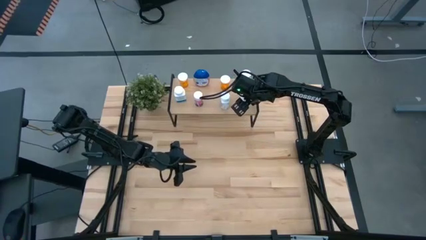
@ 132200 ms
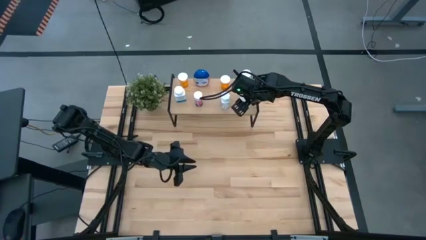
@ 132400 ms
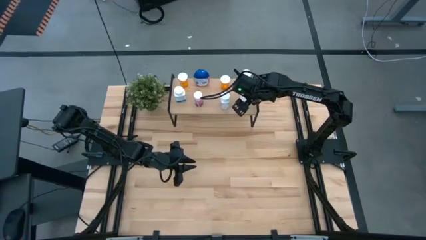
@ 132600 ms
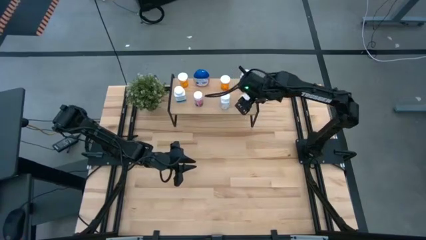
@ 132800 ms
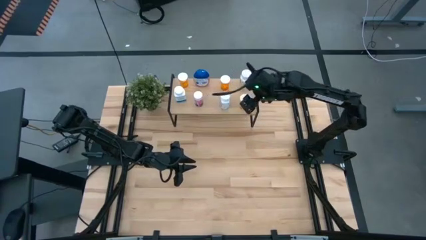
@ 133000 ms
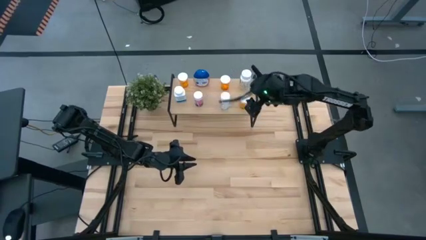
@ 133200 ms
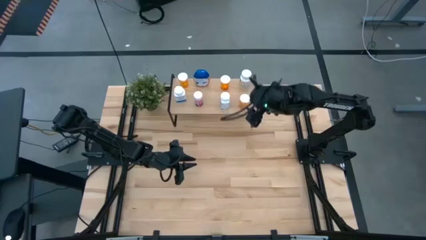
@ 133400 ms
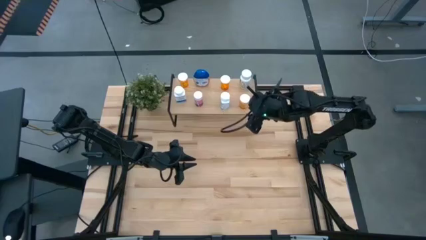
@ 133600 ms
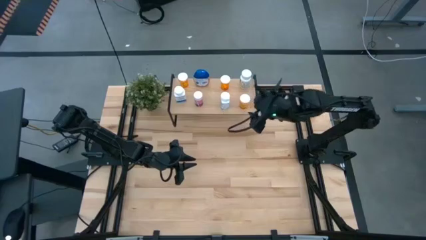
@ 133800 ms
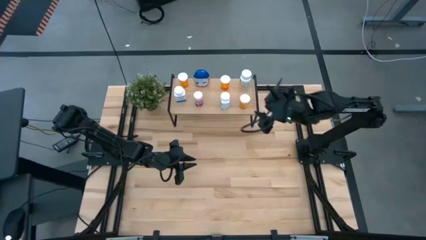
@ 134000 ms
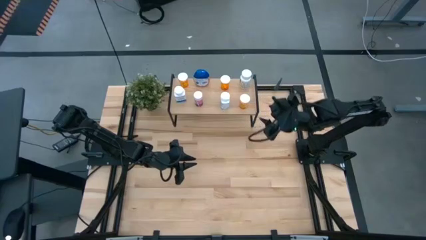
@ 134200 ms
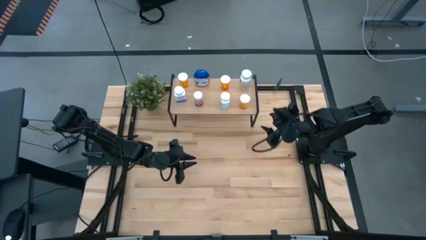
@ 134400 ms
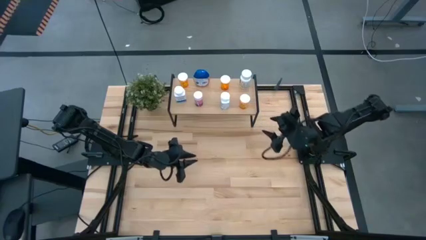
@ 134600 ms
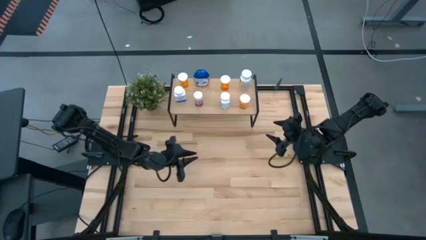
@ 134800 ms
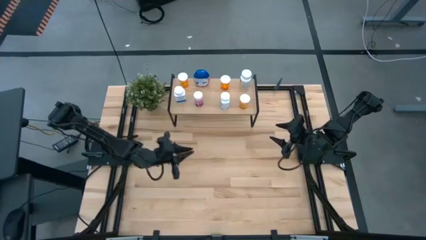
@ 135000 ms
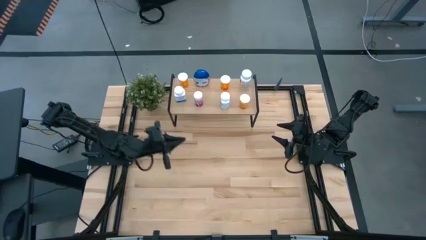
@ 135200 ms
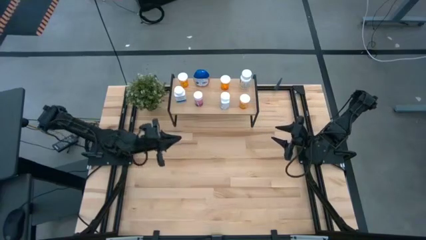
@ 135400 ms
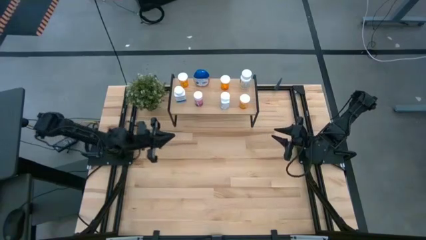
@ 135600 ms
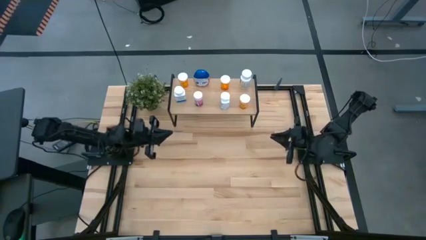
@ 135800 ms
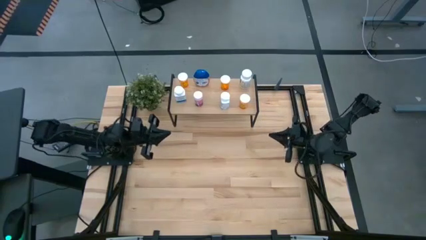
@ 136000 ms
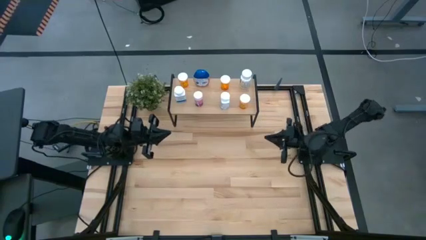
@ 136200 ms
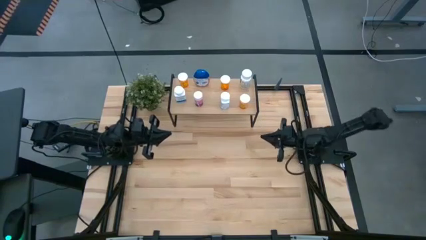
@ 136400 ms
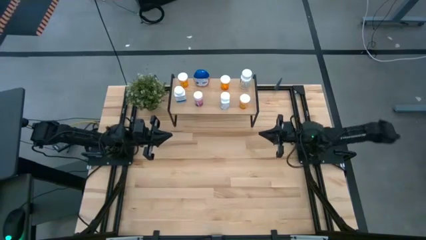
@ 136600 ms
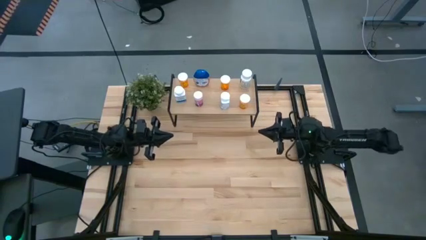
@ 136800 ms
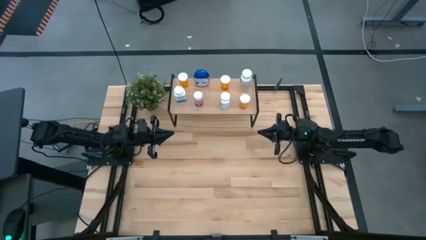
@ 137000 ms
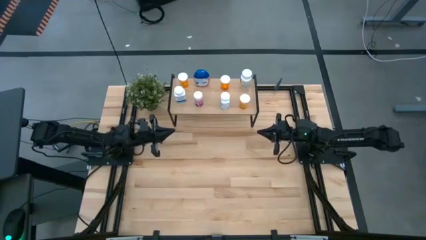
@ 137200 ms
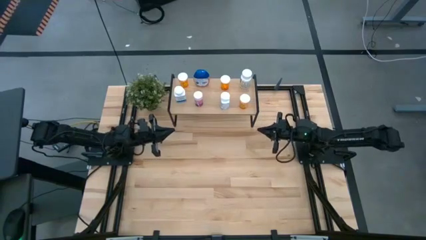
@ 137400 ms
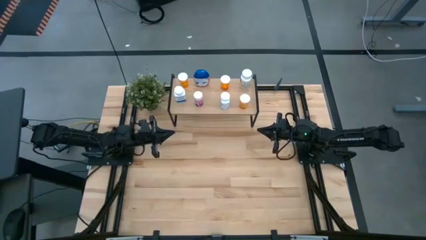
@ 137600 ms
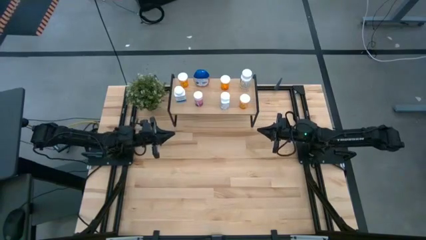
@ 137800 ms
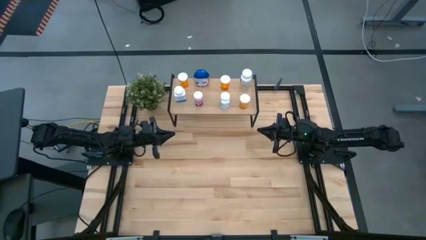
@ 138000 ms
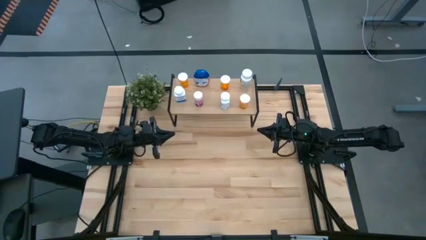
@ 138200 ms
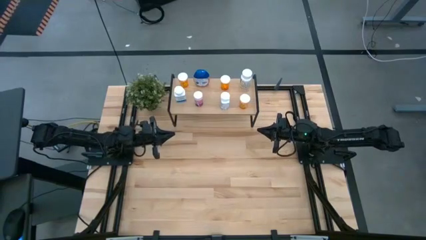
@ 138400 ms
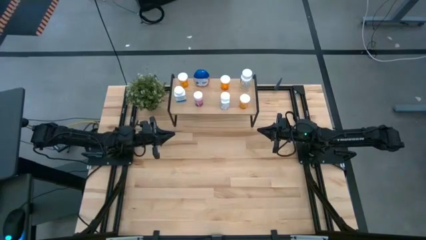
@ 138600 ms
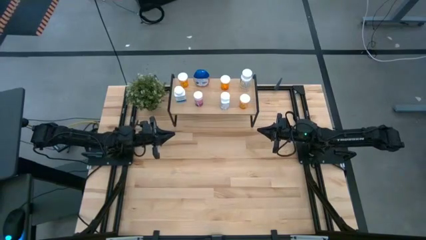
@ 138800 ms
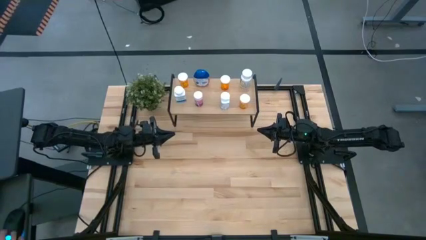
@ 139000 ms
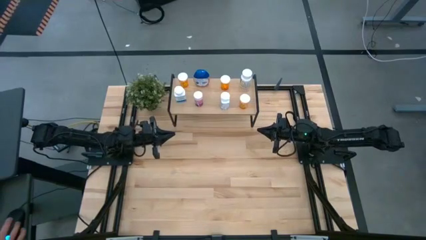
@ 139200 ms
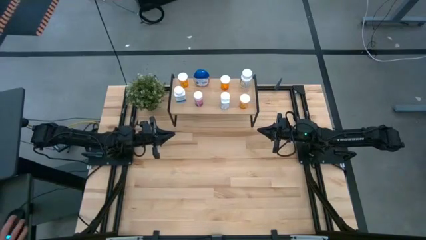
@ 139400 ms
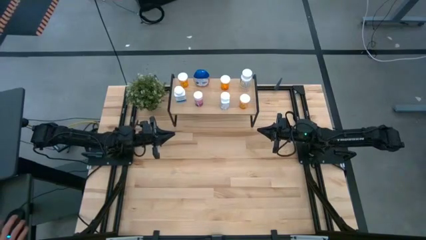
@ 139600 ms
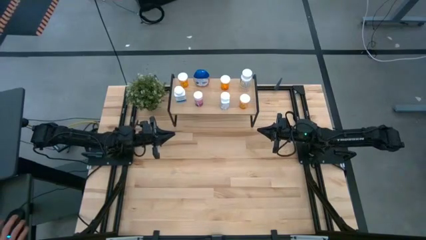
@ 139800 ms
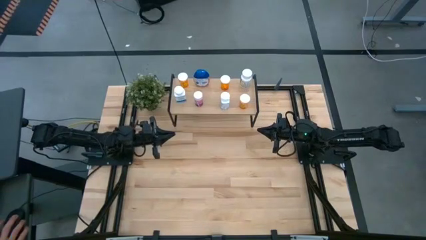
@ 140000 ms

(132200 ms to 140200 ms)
Task: Pick and place medicine bottles onto shelf by color
Return to Home Position

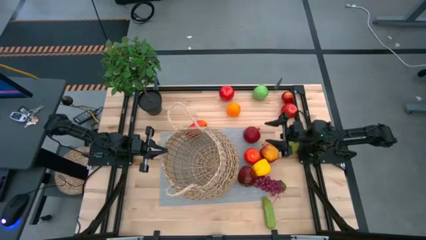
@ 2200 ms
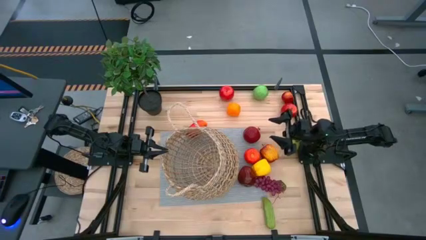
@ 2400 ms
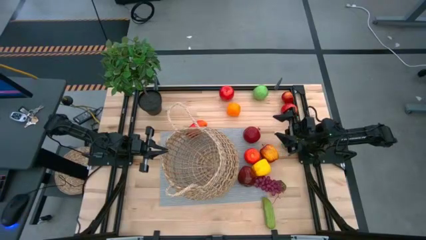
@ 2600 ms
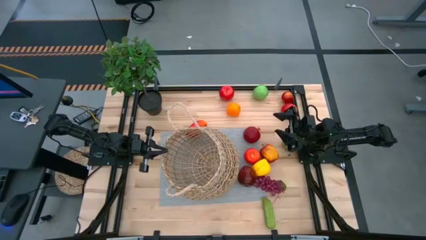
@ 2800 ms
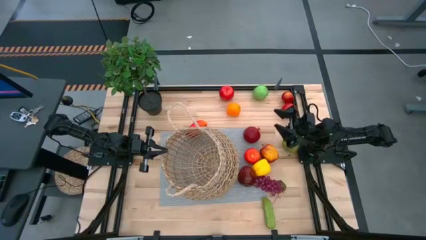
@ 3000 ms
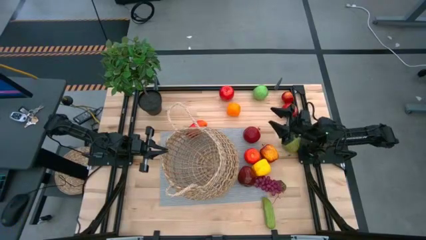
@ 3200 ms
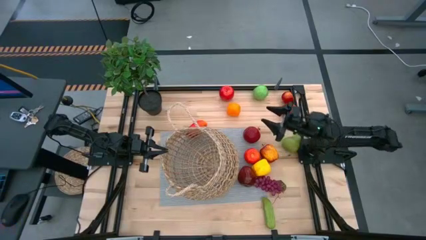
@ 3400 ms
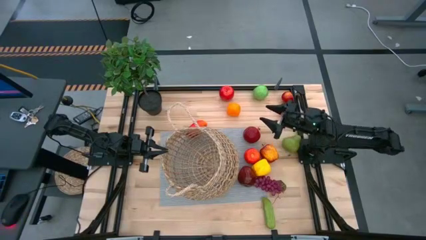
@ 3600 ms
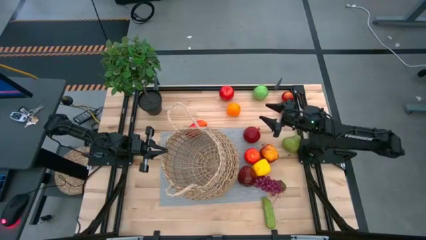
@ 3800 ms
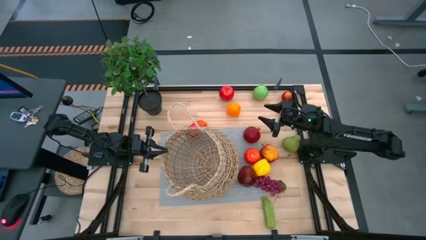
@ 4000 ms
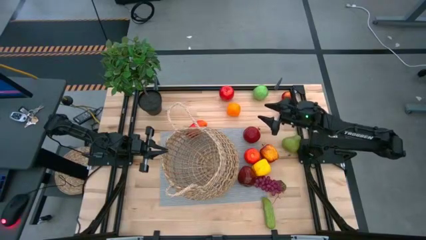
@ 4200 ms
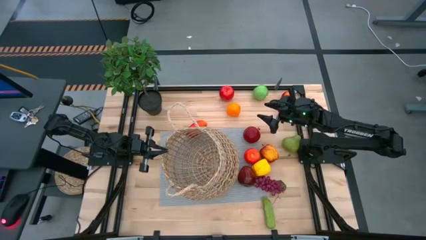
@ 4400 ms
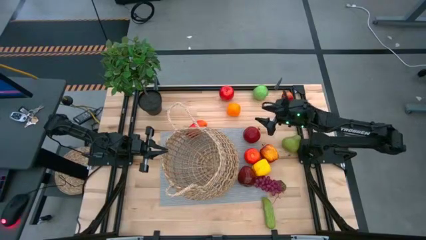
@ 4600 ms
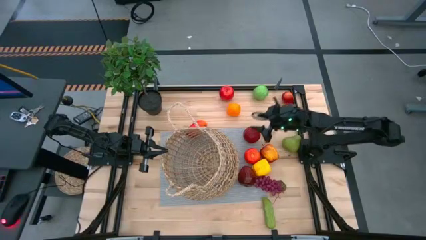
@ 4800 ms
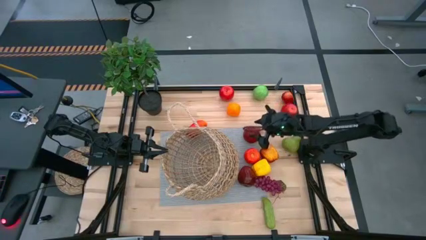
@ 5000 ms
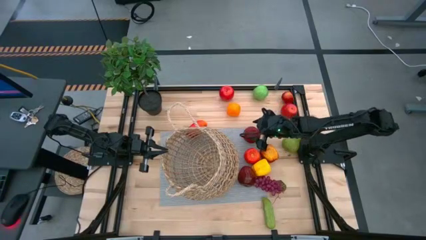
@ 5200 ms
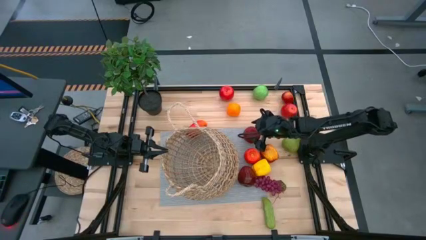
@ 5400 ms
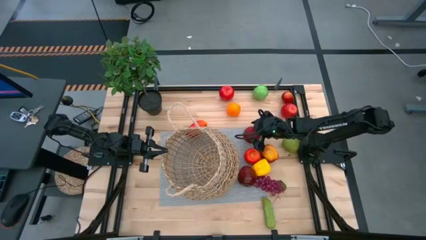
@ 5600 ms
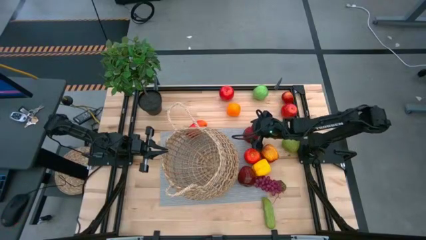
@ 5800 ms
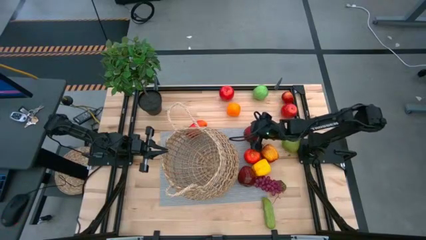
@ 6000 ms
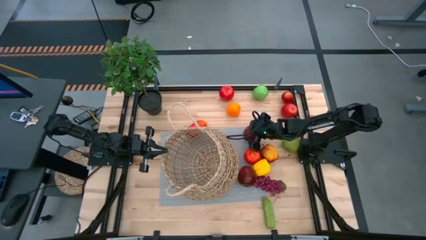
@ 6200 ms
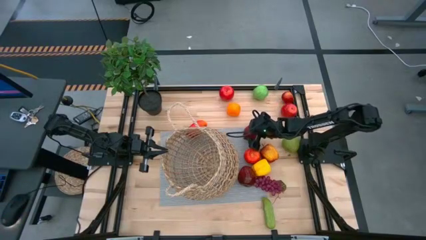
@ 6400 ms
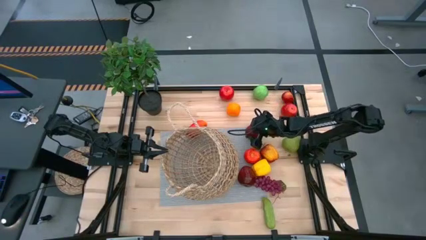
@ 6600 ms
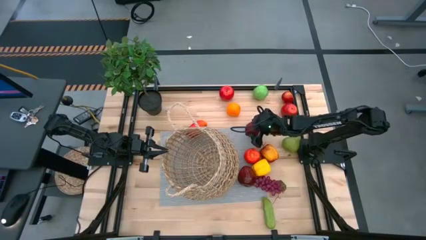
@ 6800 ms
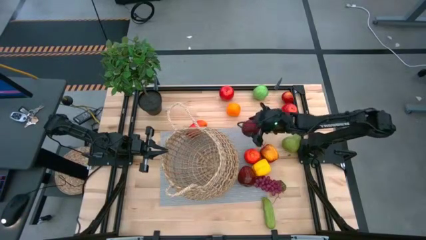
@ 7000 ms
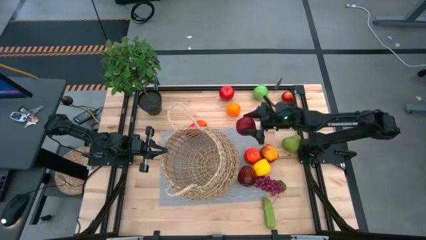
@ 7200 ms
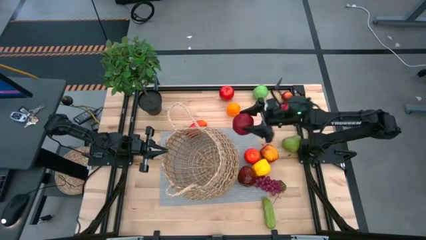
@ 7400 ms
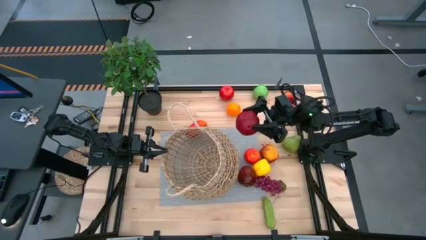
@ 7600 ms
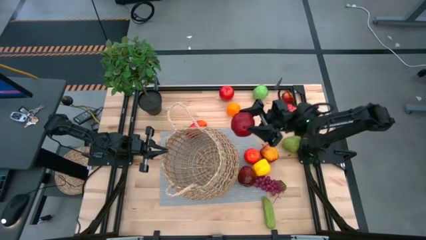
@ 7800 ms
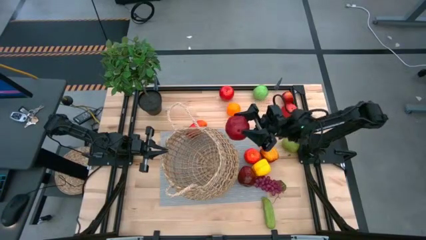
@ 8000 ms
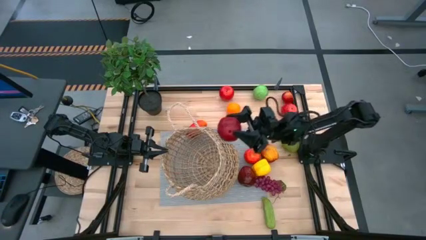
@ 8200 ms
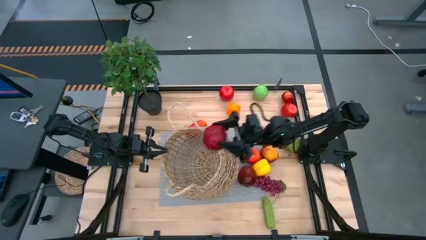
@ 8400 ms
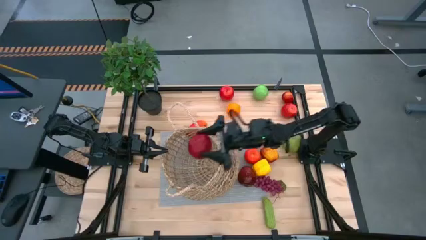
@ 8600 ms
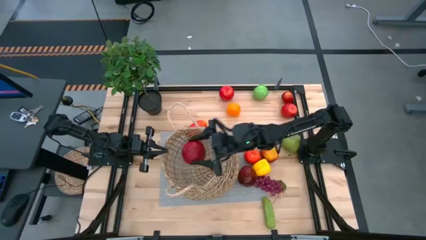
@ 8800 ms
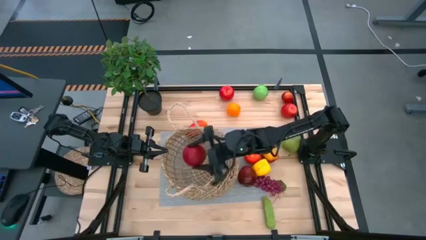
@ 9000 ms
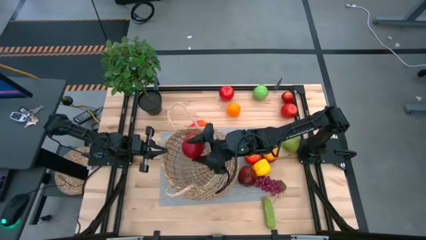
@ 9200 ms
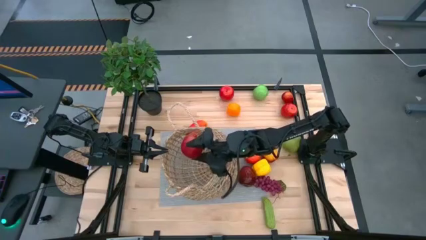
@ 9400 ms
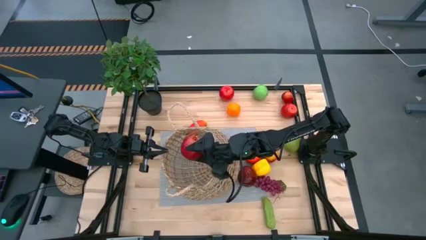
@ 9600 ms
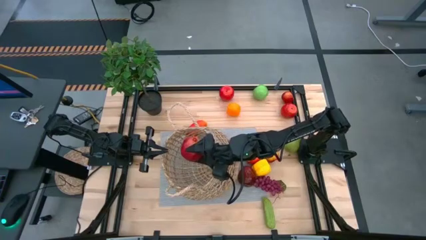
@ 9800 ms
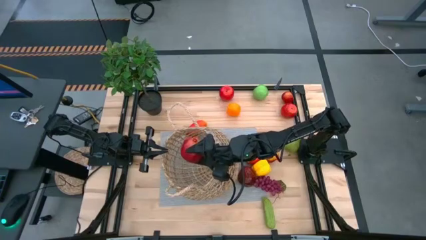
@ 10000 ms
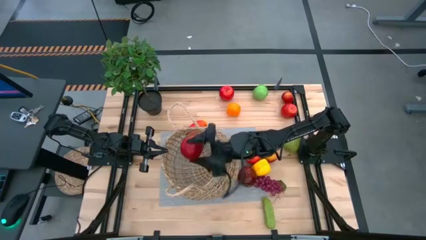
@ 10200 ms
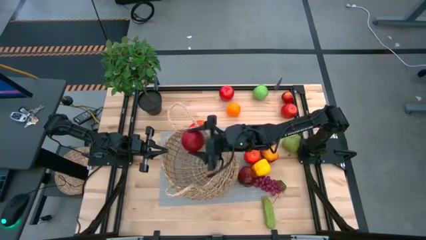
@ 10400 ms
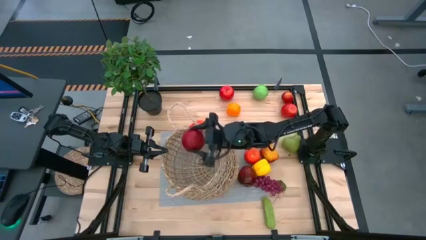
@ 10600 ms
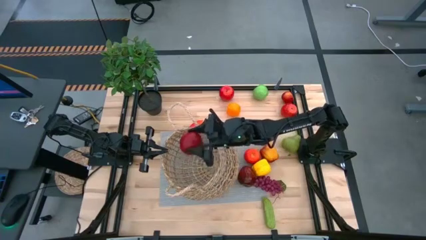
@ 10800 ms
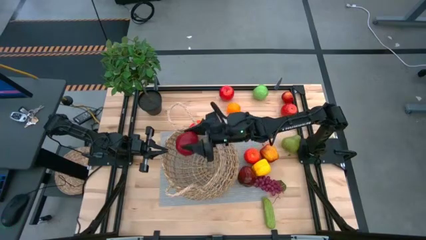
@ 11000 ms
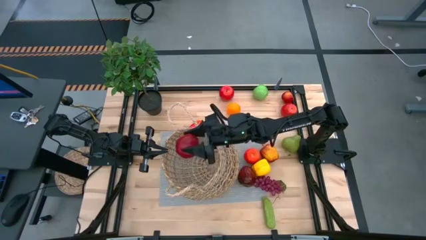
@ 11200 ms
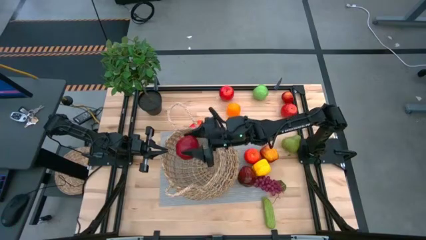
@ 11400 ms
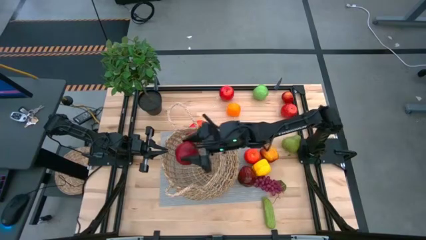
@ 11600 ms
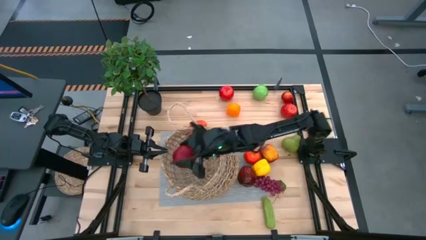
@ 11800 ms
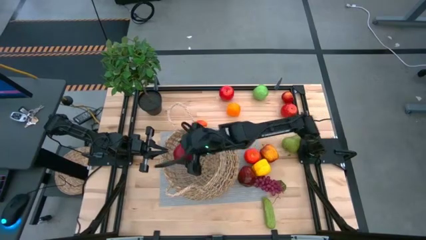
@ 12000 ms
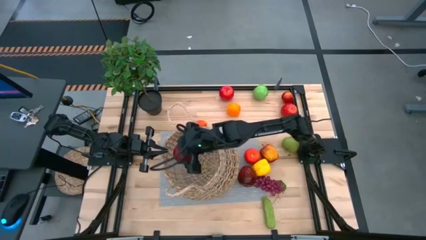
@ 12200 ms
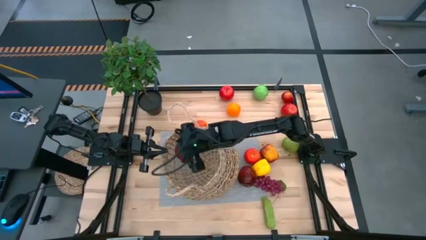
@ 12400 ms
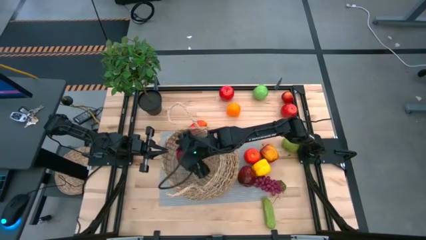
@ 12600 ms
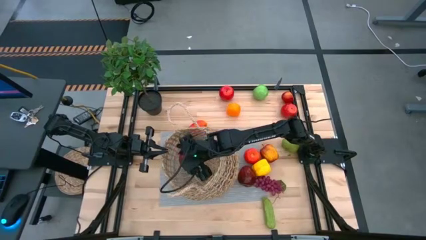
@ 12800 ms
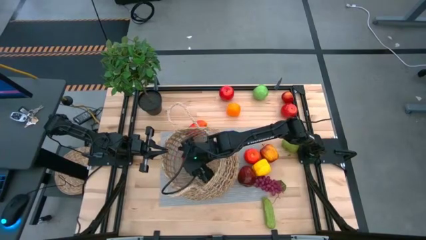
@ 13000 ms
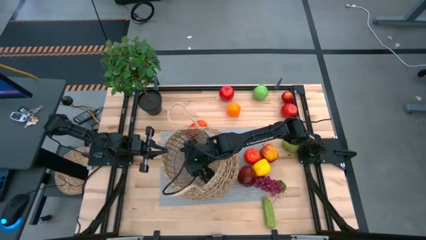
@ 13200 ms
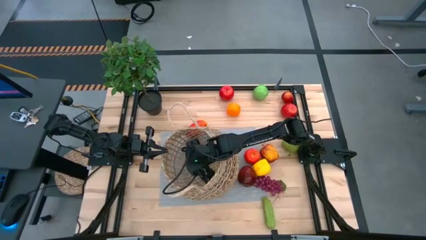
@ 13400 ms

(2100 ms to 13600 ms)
Task: Build produce basket
Put the red pomegranate into the brown woven basket
